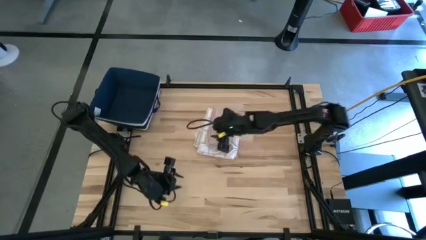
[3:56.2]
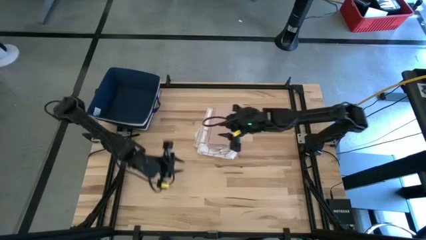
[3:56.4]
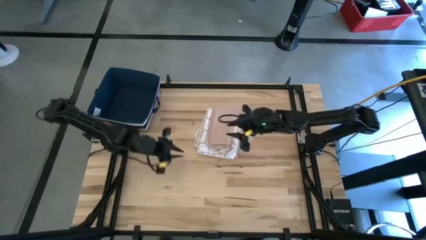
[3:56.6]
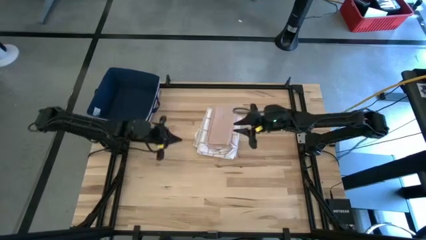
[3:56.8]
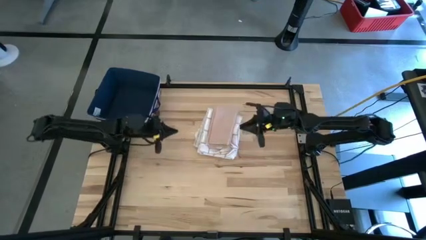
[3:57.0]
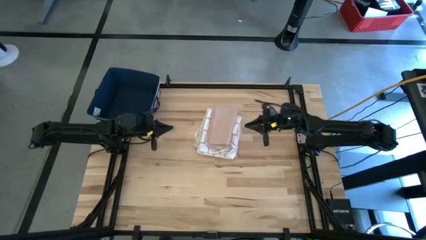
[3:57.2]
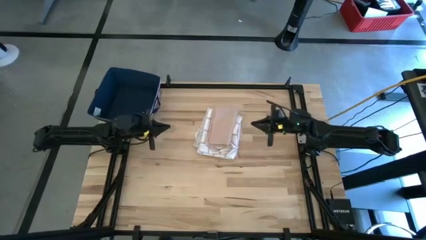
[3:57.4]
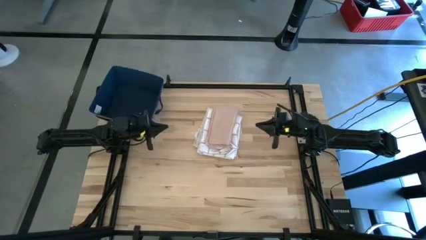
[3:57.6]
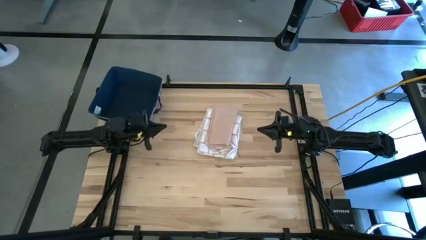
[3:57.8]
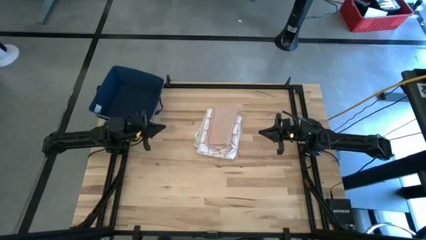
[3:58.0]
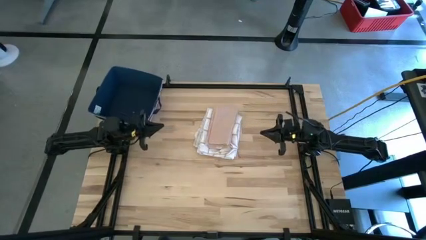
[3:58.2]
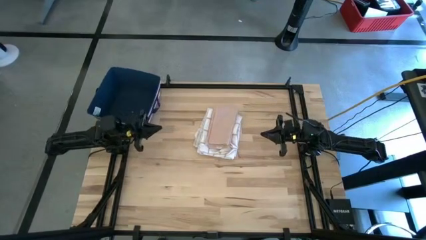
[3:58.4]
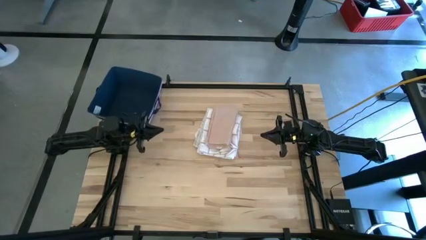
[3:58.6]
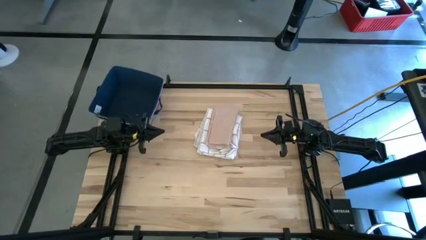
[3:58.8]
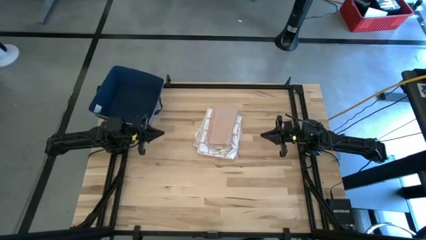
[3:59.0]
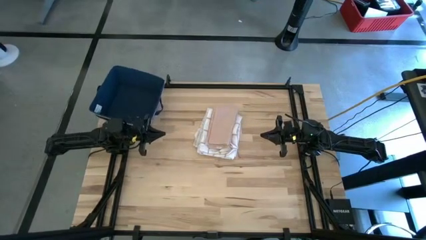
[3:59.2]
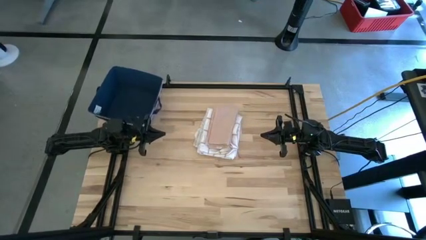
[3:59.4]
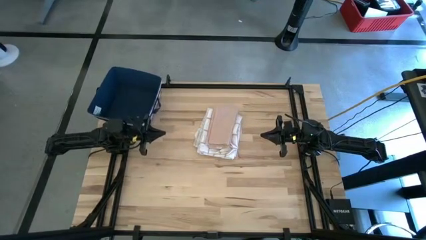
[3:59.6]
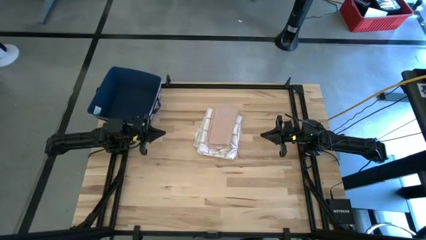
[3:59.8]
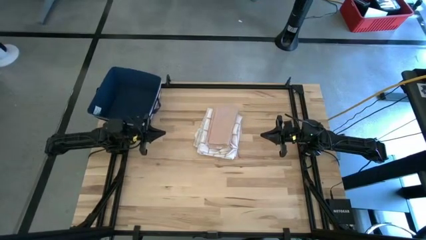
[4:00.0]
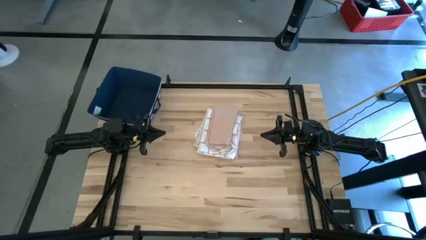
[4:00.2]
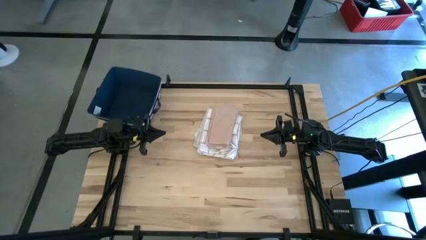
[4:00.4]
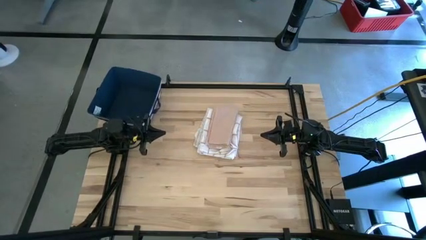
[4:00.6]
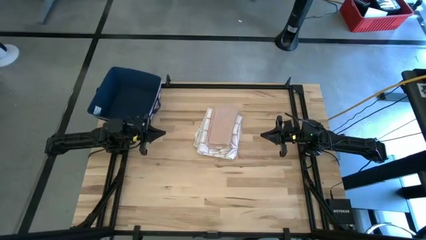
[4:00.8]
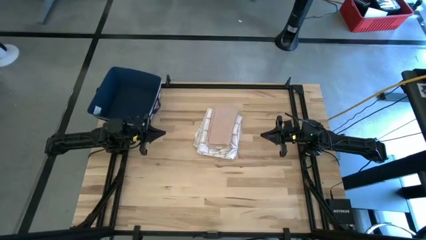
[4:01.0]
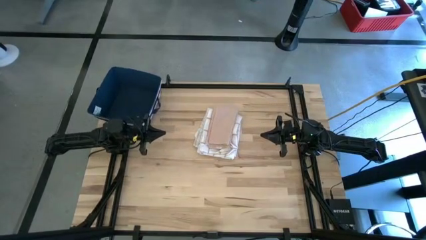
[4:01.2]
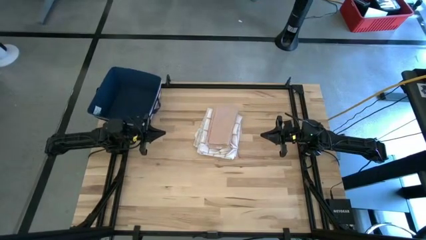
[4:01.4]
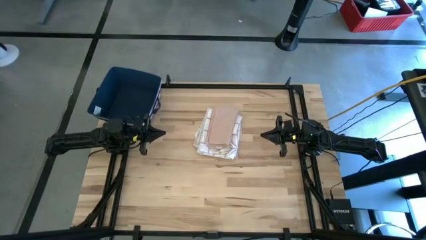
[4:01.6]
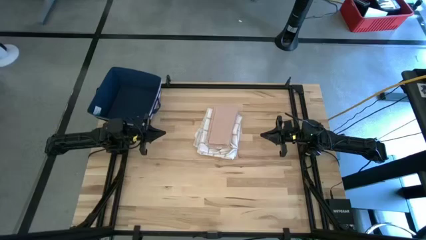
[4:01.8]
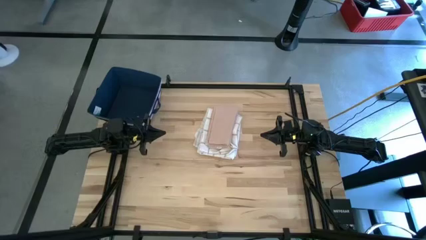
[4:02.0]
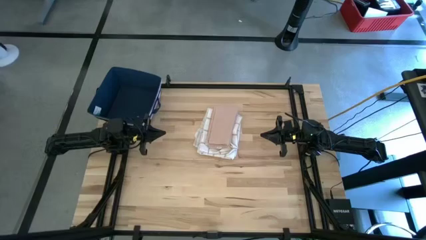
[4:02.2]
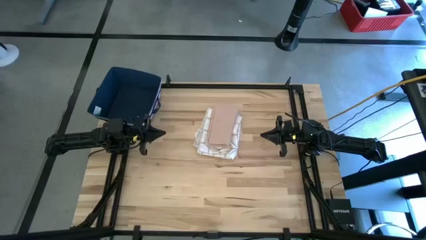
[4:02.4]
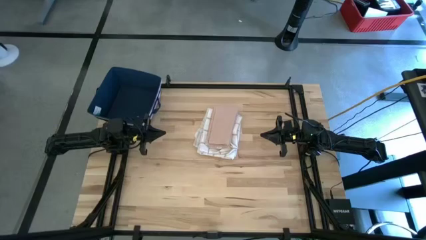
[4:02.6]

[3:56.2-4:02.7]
Task: Fold towel
Return to Home Position

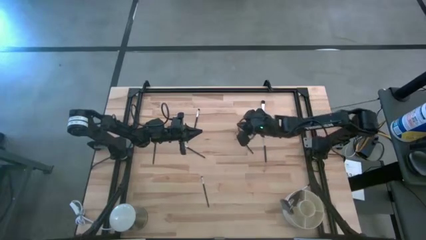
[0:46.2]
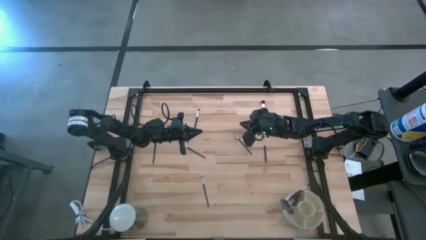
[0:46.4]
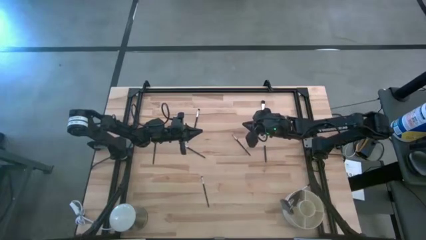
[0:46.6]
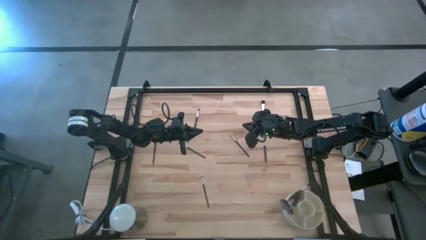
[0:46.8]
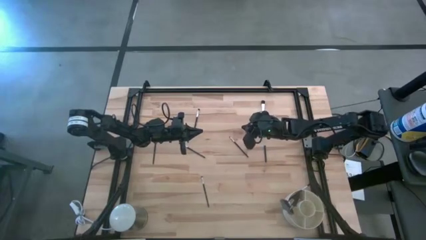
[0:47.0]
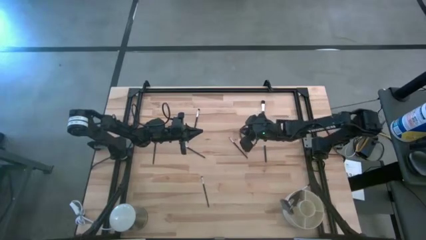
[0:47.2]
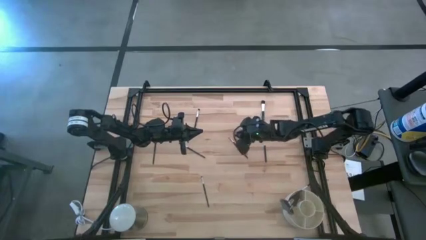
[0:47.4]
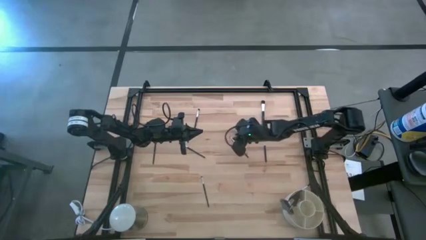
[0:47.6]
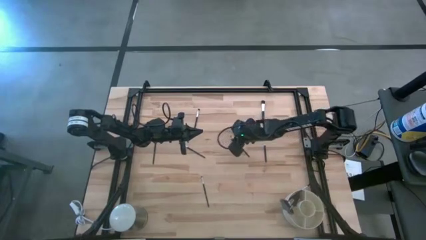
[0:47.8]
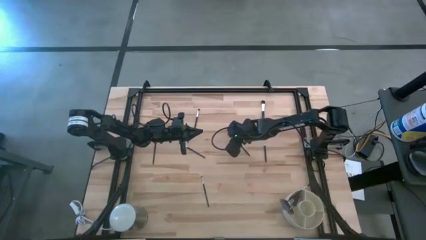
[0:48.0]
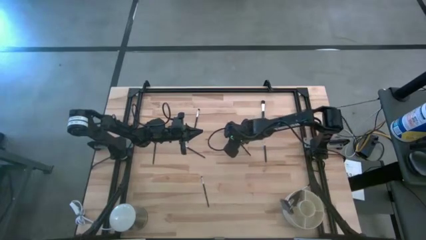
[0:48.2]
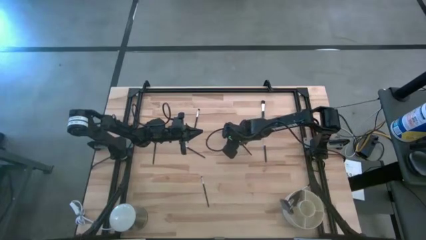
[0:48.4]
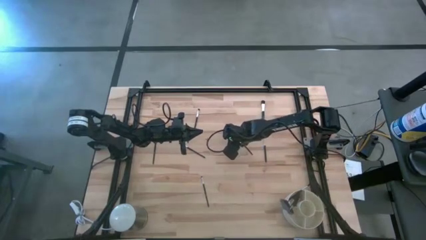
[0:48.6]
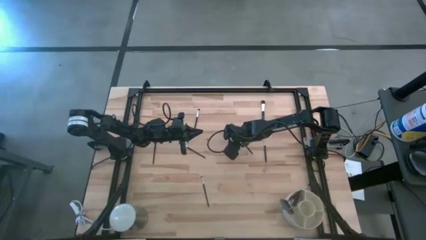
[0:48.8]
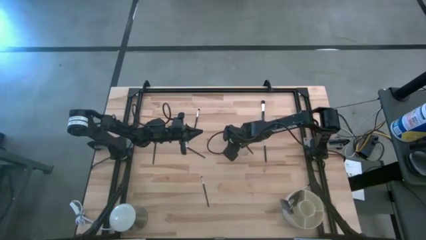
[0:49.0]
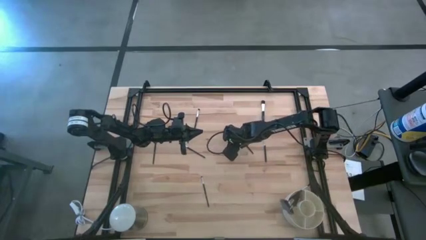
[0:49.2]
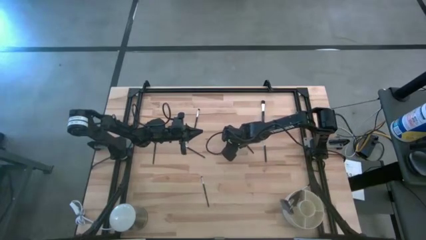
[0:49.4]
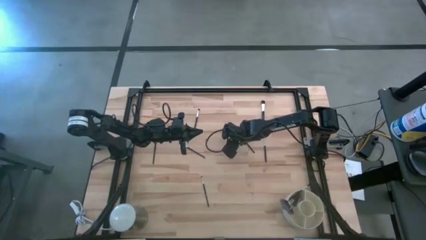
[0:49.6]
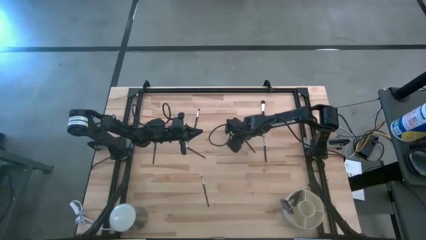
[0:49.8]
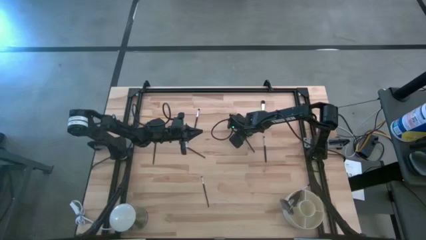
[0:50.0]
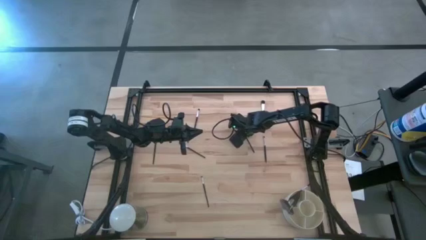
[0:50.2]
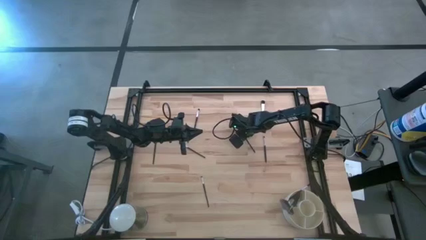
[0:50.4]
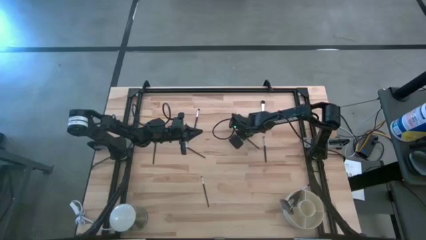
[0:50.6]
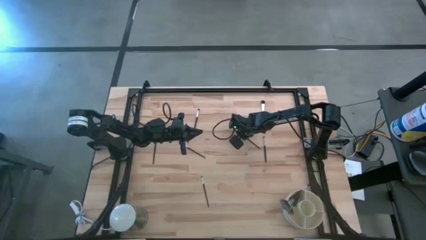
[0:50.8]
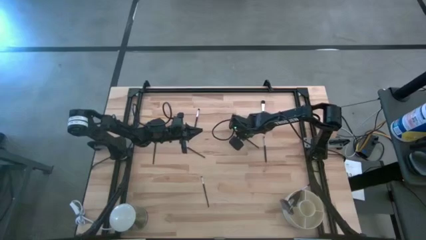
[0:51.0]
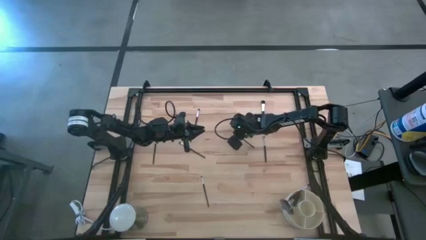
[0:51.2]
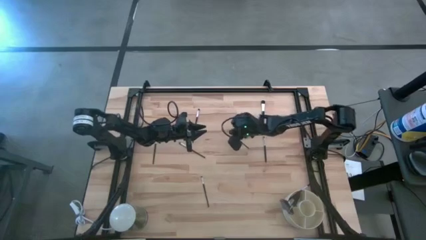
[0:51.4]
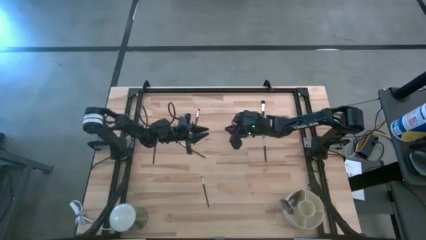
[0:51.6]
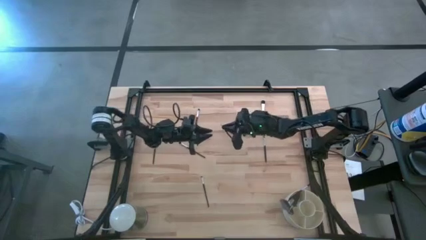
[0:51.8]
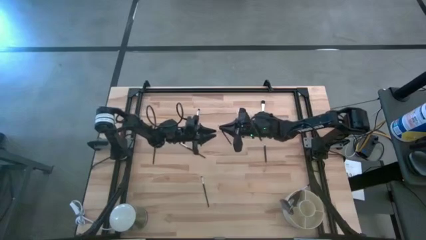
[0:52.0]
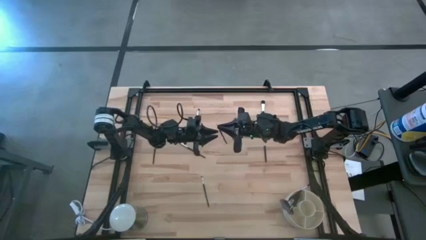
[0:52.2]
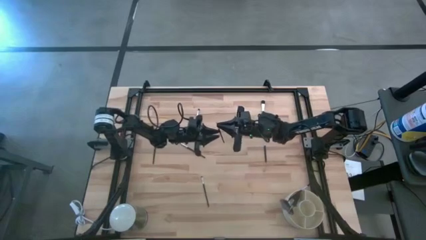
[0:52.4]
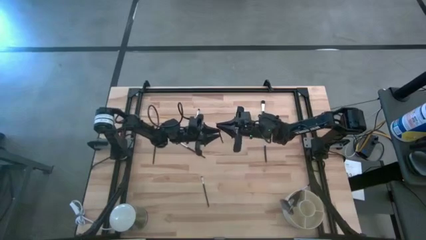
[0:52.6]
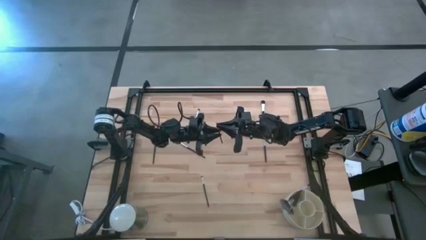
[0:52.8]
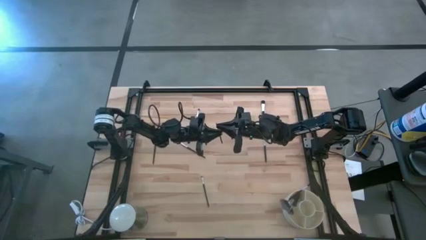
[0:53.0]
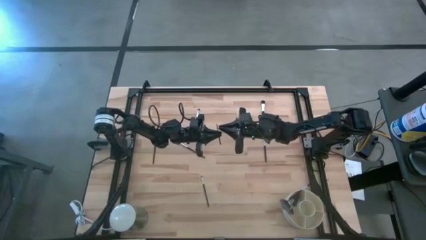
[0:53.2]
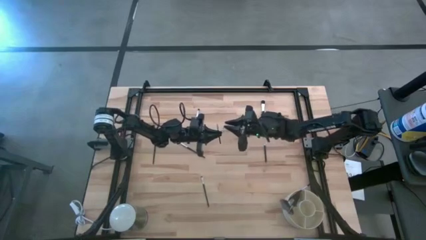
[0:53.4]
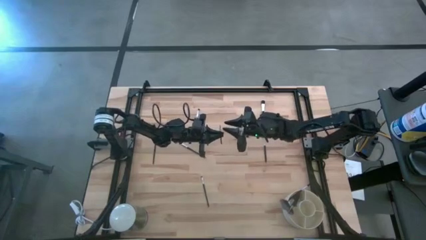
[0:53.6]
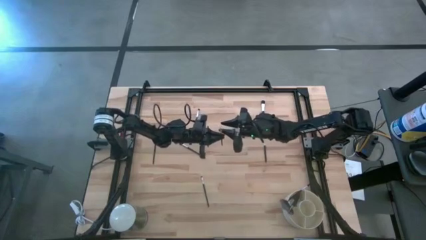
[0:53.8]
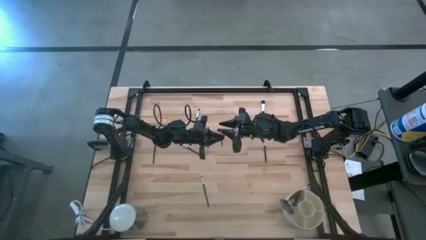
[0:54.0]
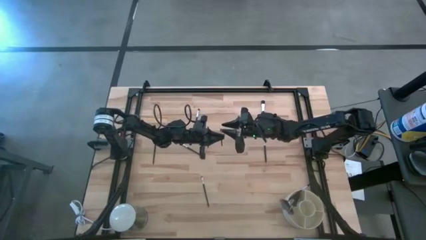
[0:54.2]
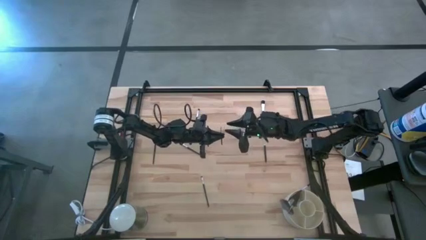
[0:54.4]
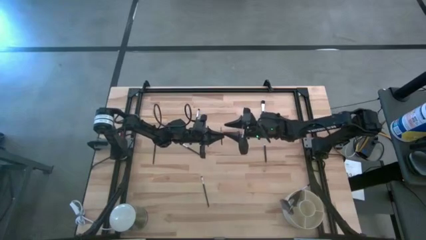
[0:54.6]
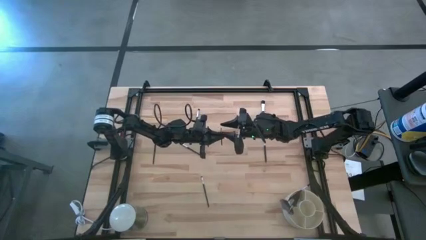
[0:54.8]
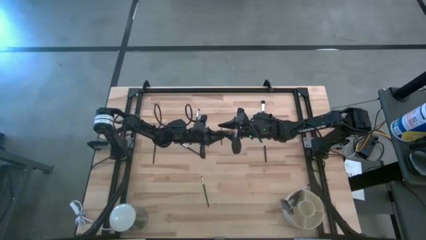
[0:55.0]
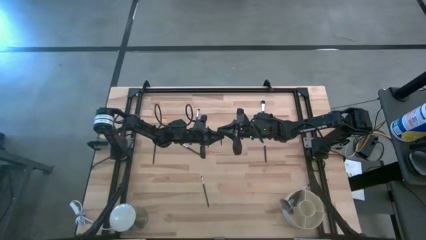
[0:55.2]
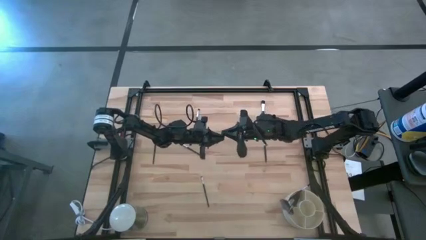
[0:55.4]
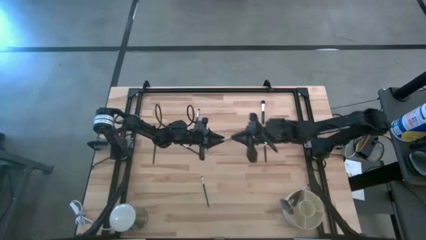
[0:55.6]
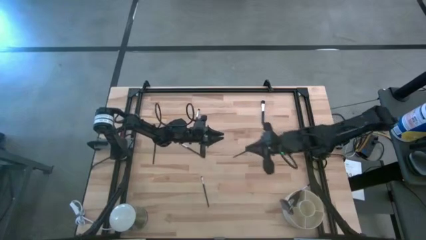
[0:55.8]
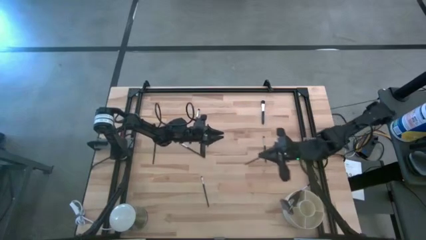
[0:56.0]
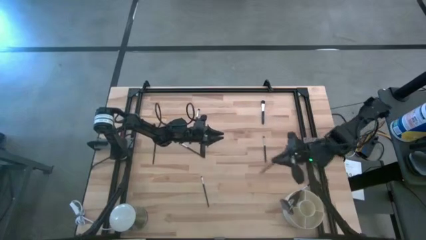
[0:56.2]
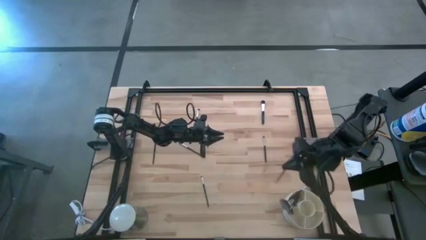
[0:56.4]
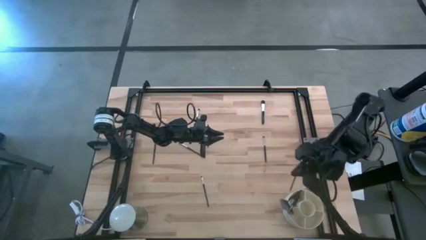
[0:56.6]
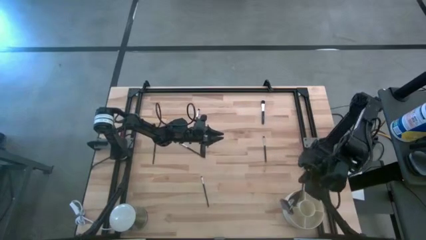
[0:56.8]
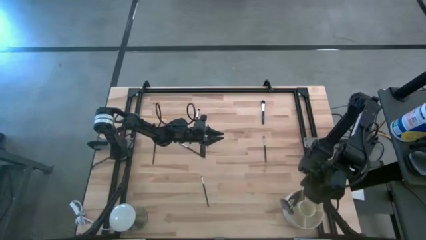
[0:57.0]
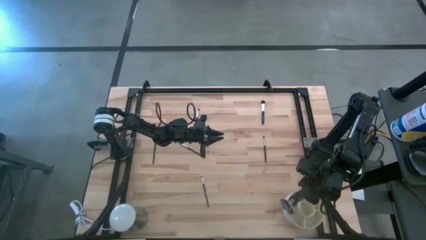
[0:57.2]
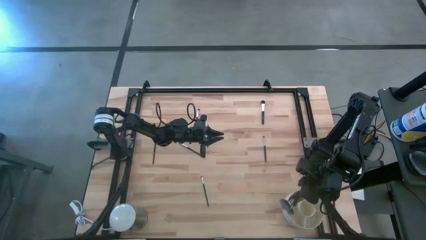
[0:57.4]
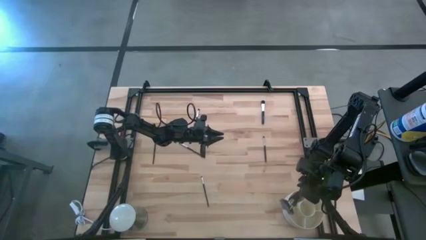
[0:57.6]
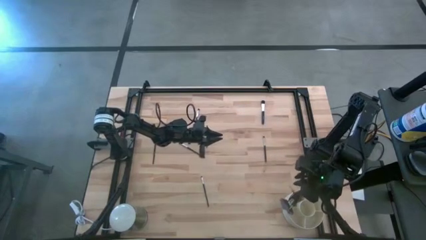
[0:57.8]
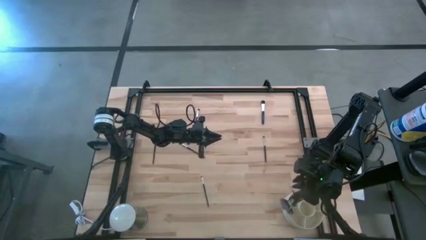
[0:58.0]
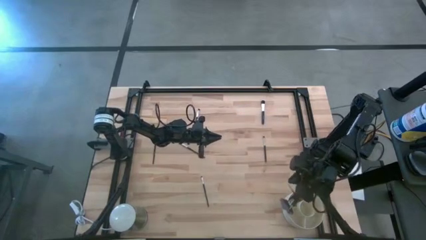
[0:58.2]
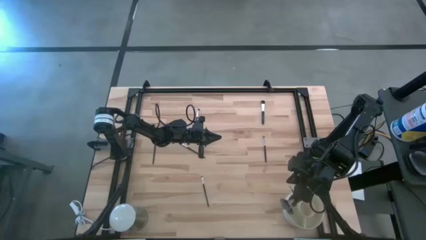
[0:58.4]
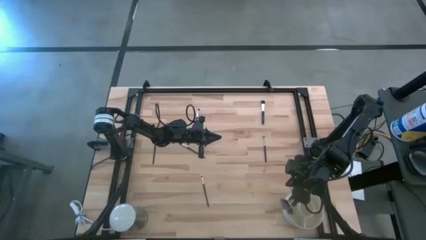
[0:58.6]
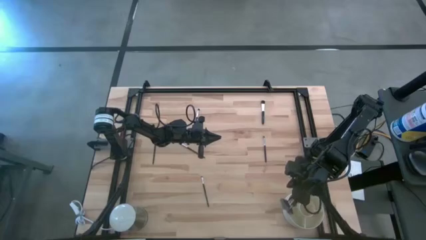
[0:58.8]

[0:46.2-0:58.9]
Task: Put items in baskets/containers
Put the black eyeshadow brush into the white organizer
